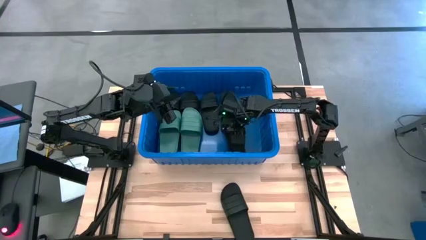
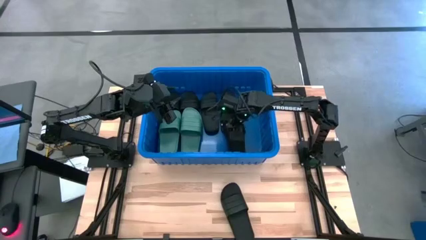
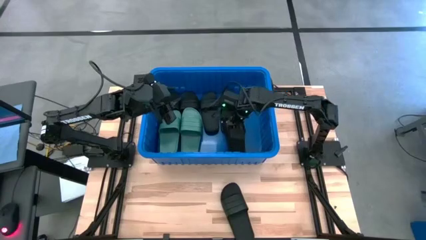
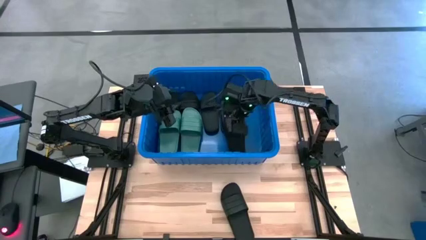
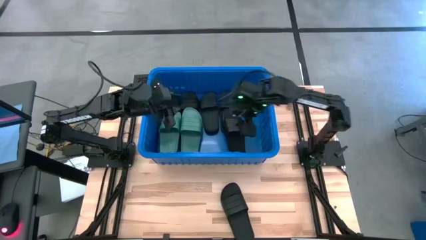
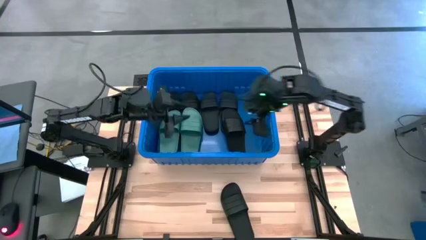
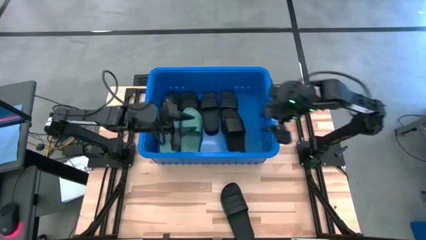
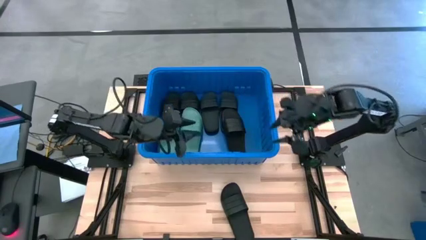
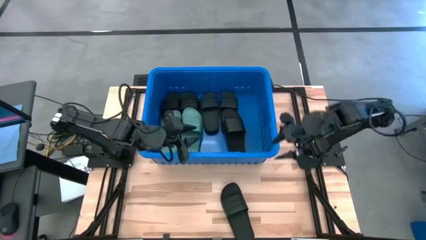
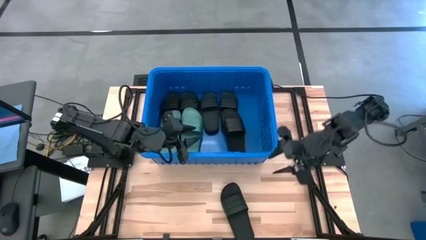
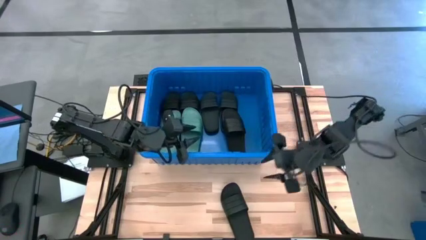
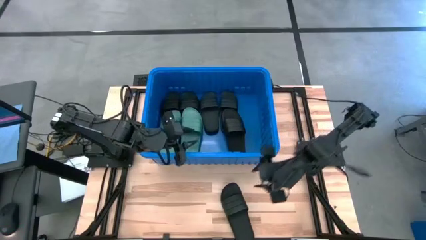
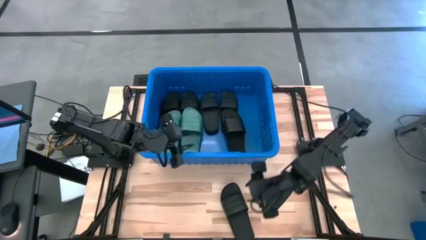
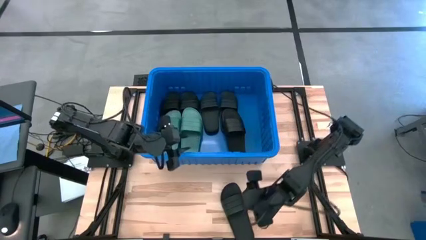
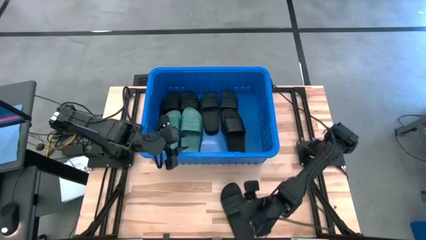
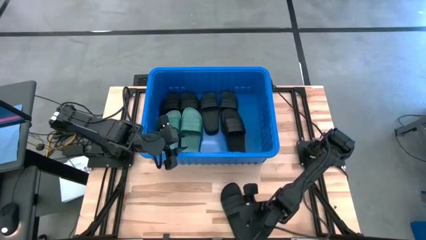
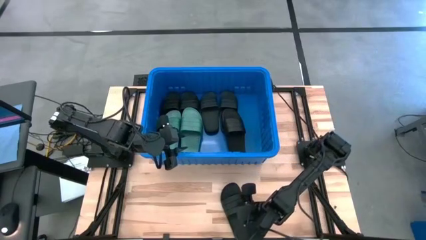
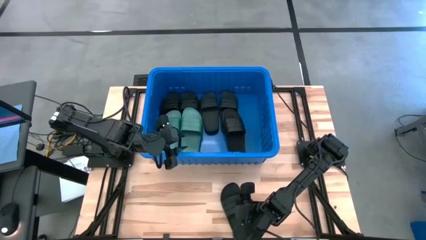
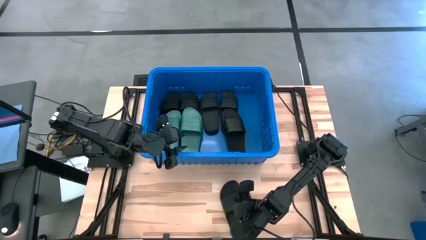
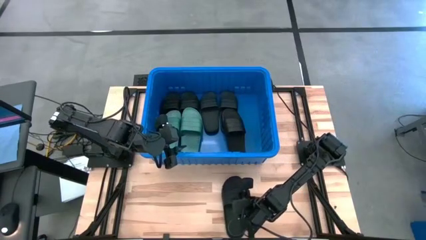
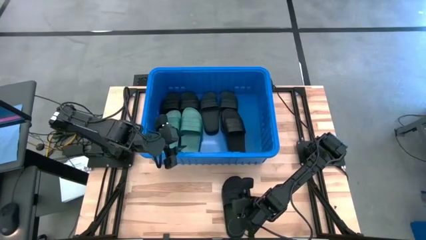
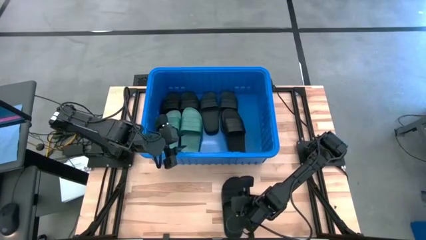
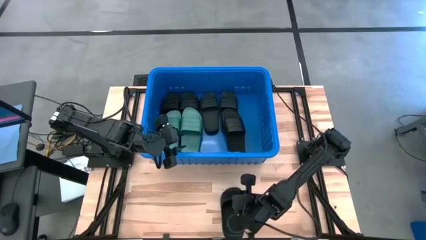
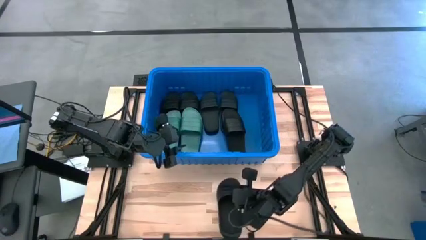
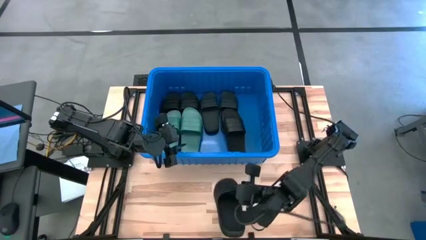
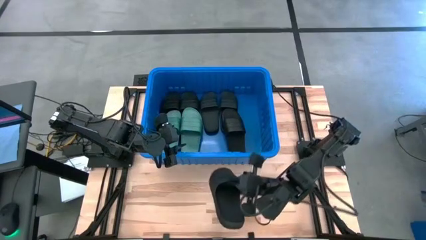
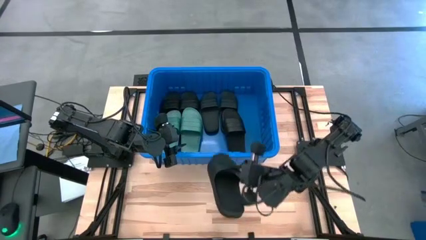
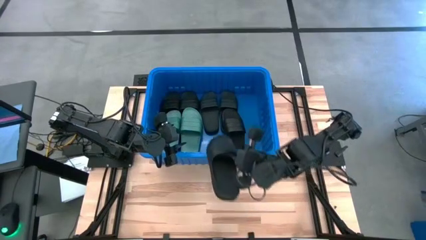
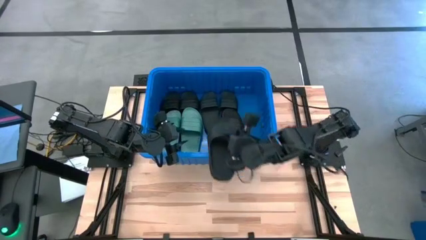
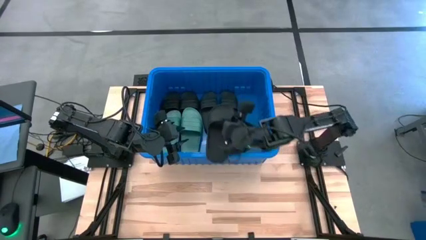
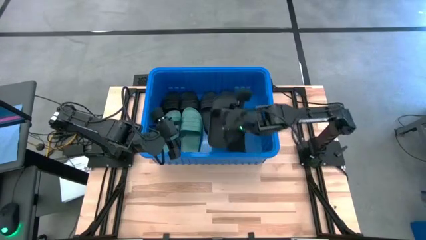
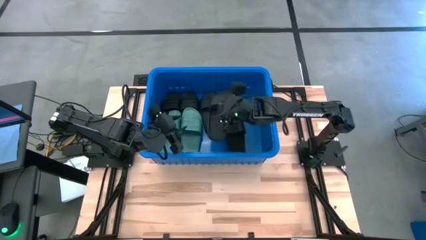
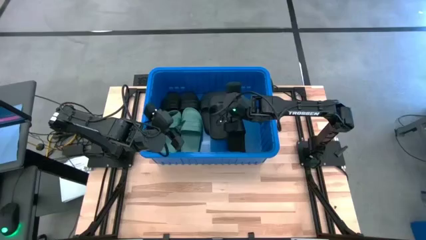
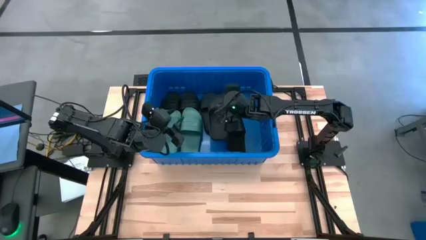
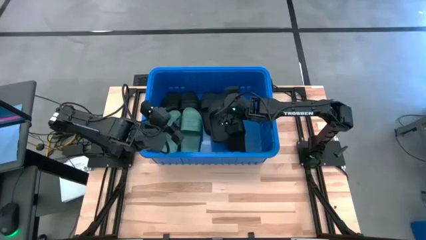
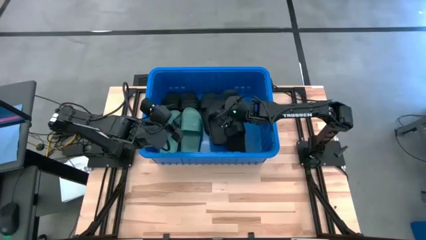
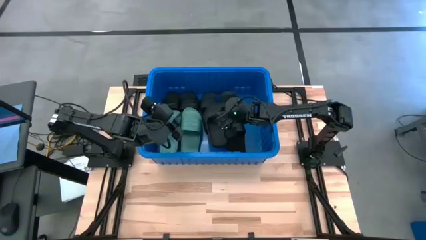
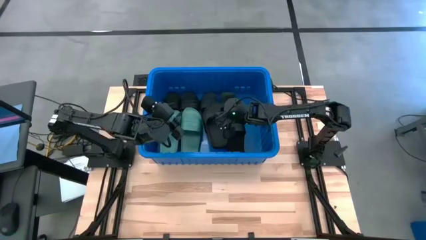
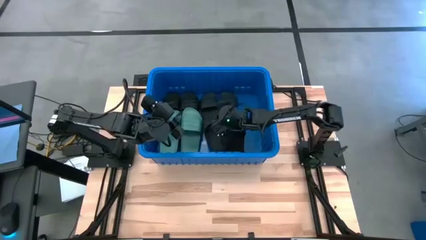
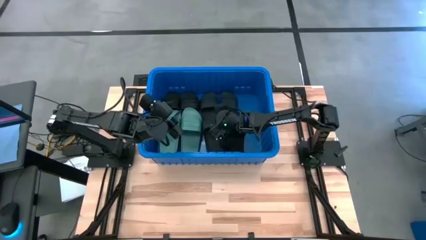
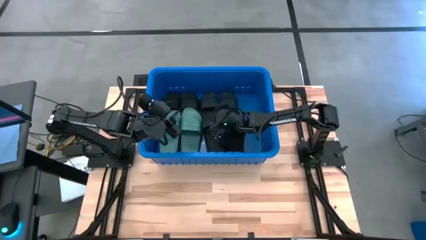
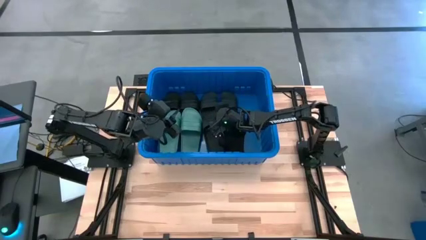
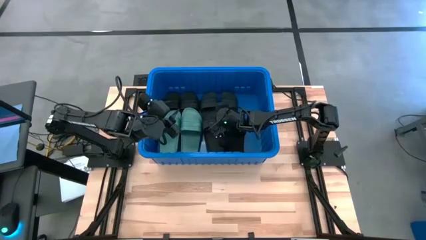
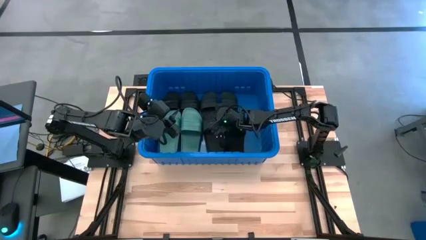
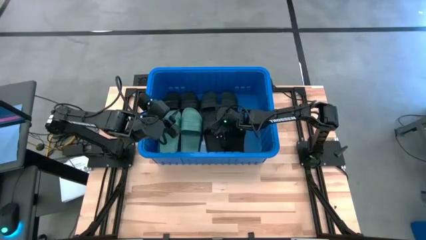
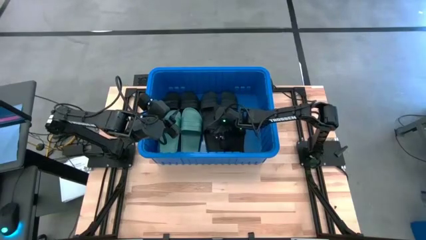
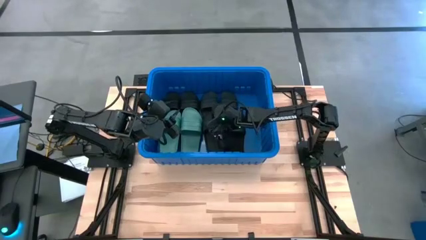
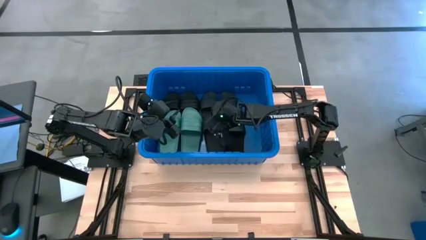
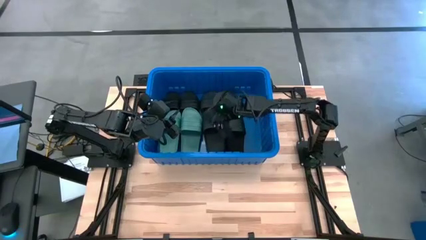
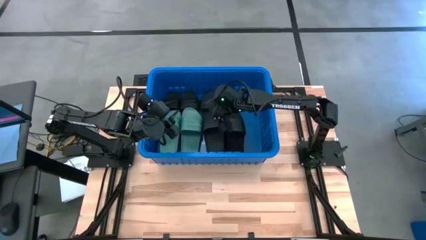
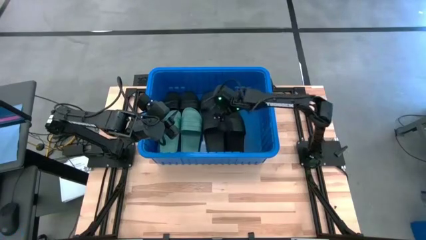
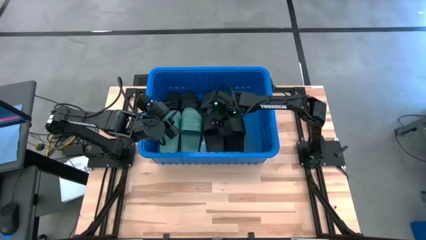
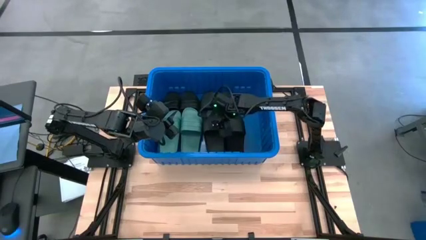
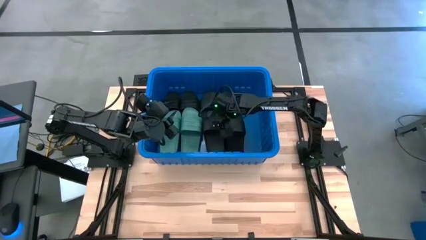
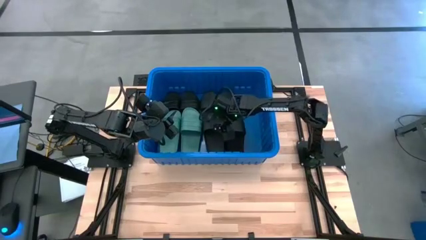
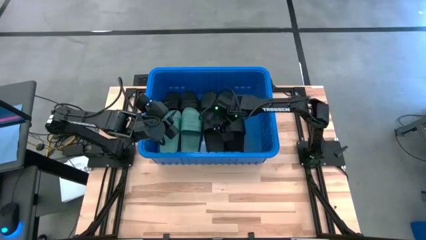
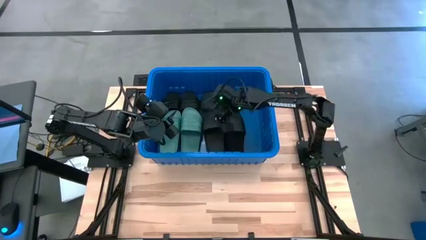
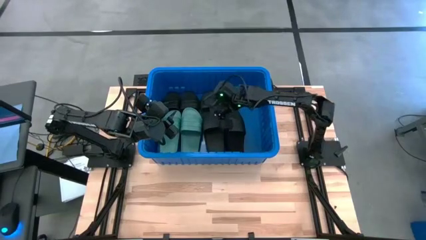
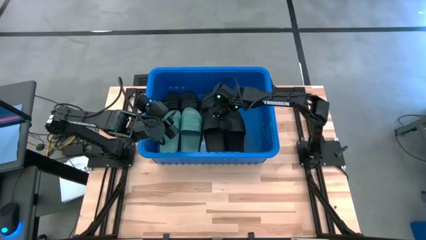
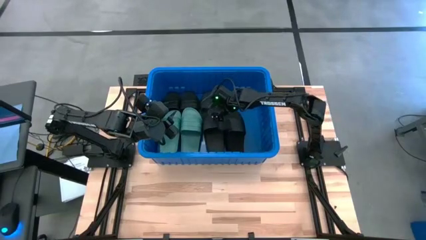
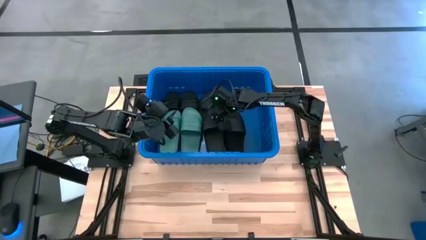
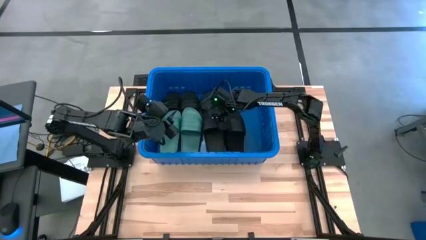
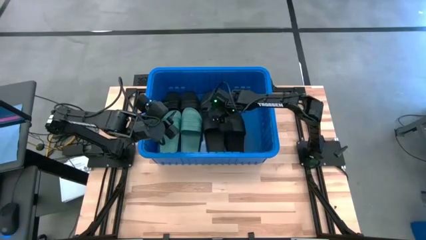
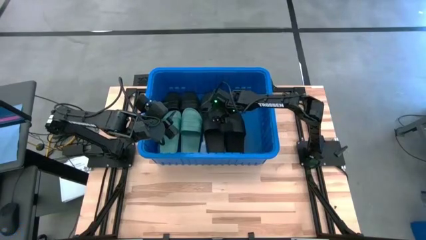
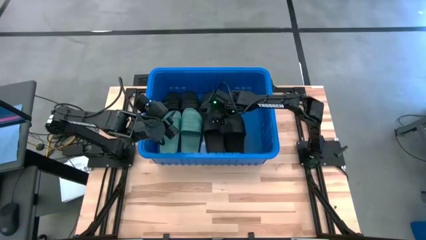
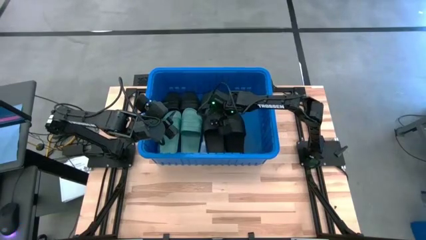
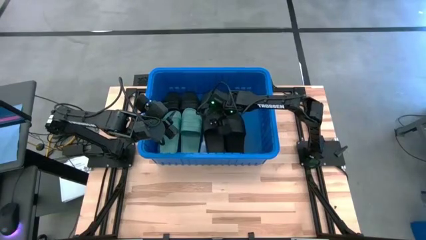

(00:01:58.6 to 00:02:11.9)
Task: Pick and place slides into bin
Put the black slide into the blue bin

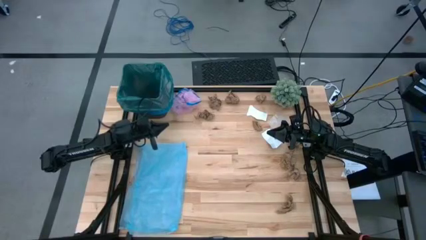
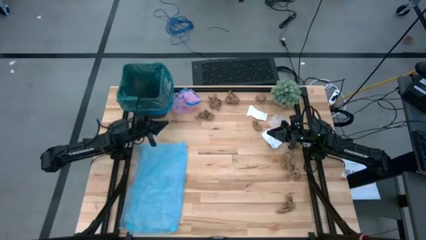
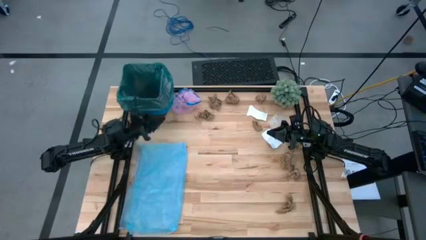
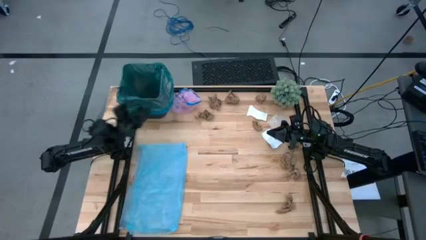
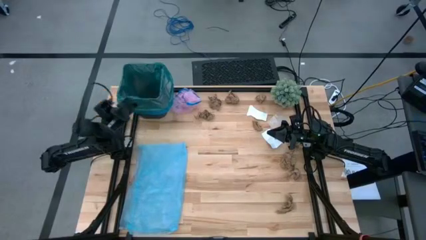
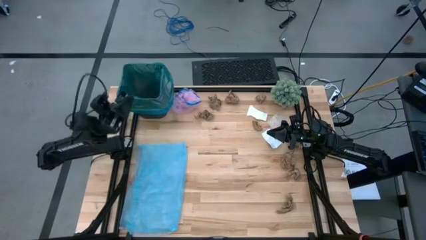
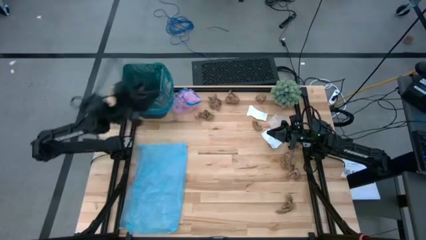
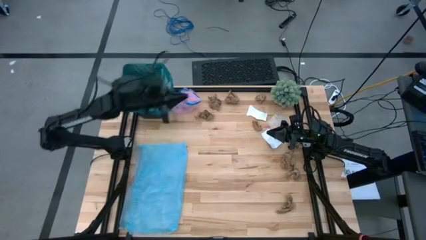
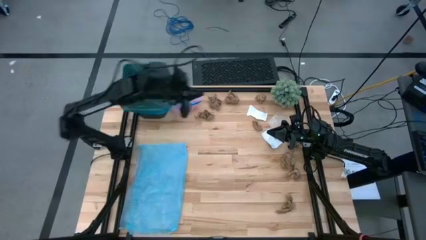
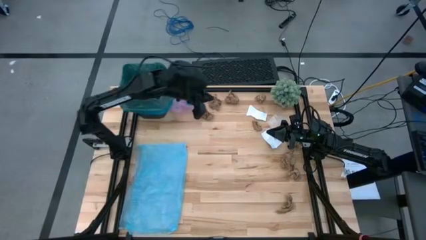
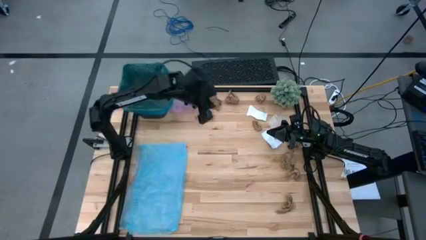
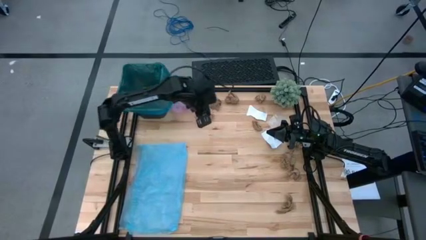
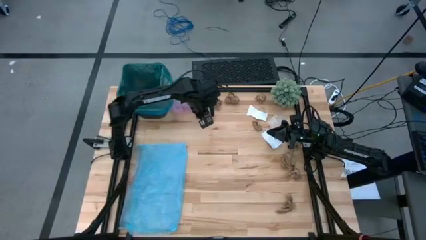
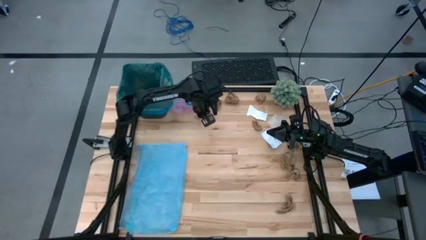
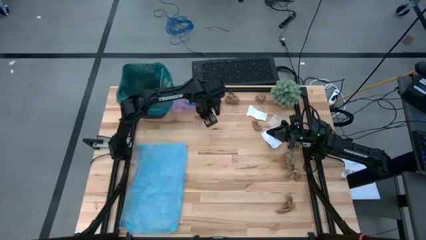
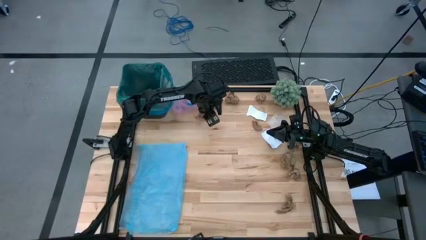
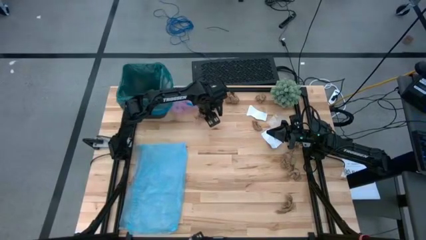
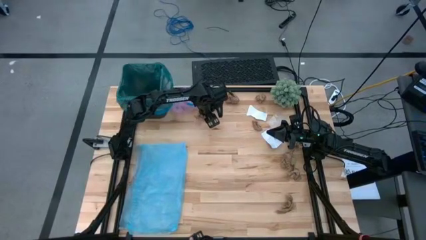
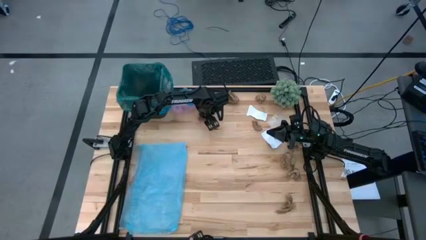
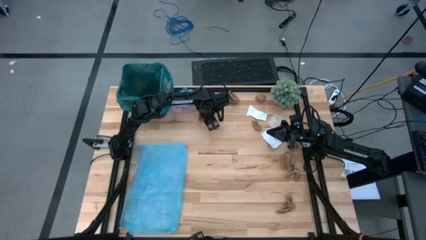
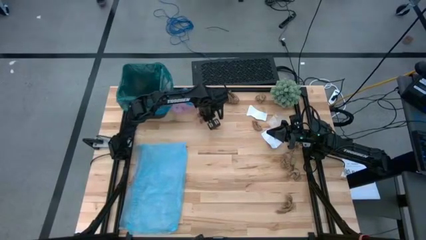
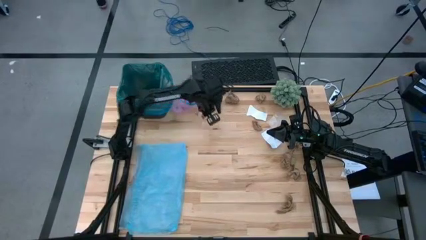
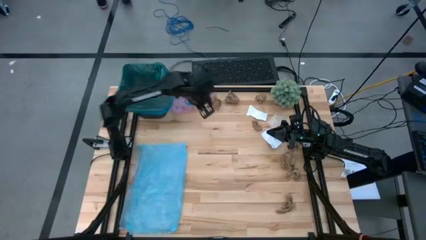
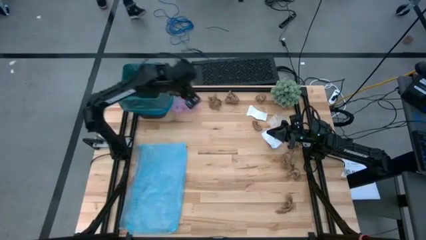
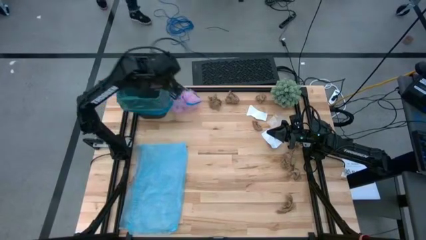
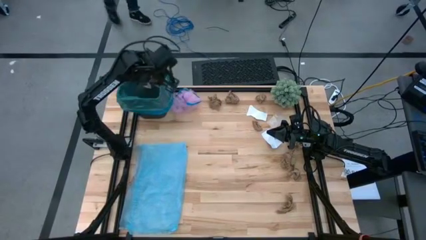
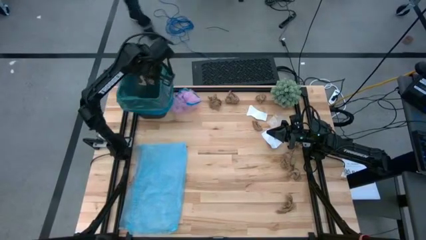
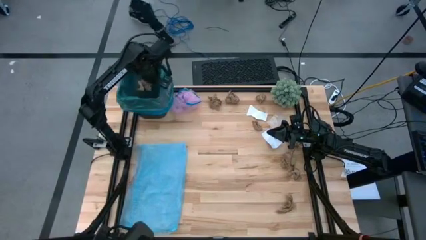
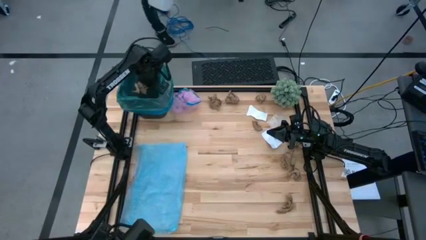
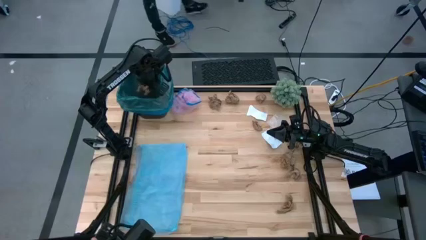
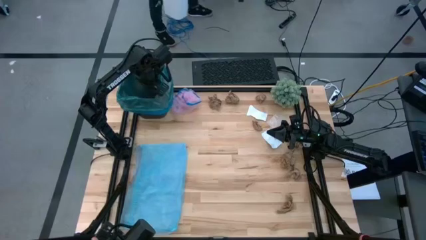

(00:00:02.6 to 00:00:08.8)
Task: place trash/remove bag and relplace
Put the brown napkin into the trash bin
